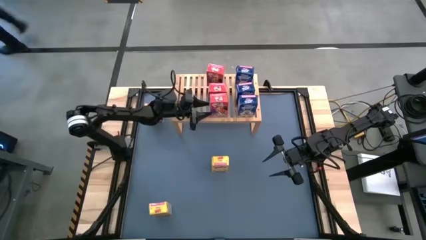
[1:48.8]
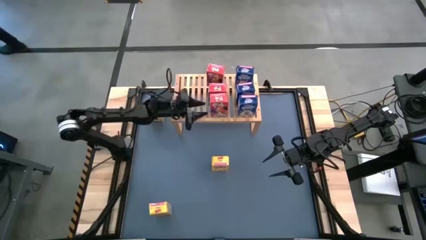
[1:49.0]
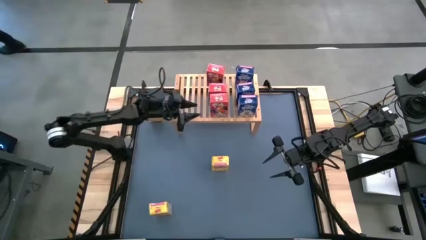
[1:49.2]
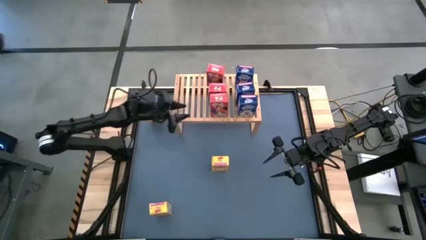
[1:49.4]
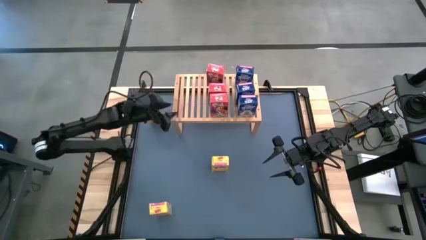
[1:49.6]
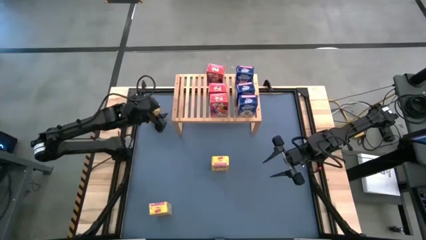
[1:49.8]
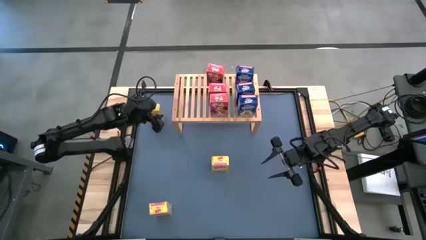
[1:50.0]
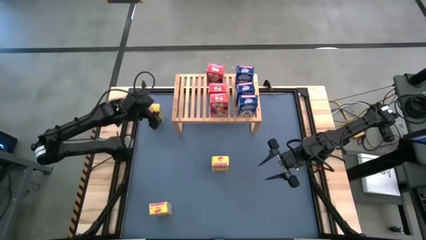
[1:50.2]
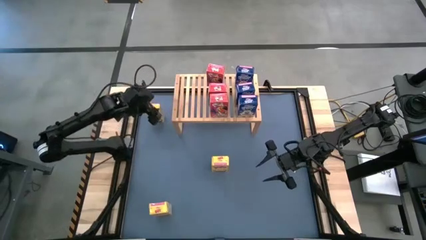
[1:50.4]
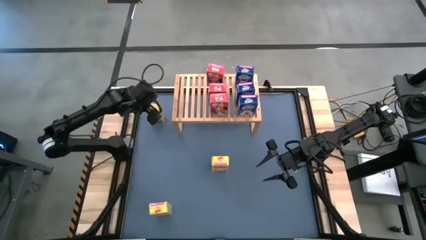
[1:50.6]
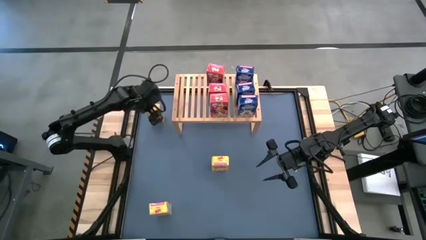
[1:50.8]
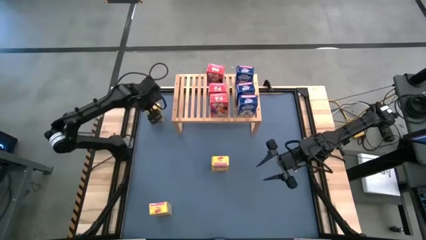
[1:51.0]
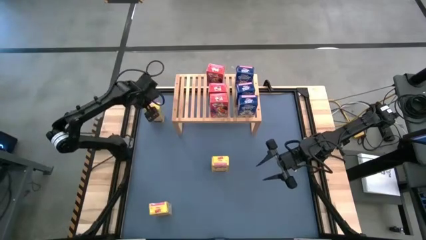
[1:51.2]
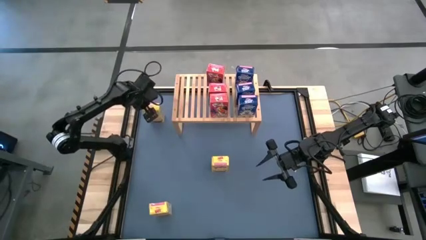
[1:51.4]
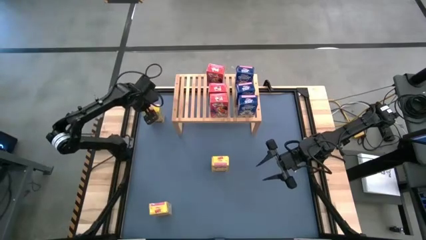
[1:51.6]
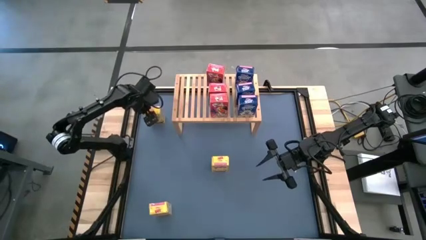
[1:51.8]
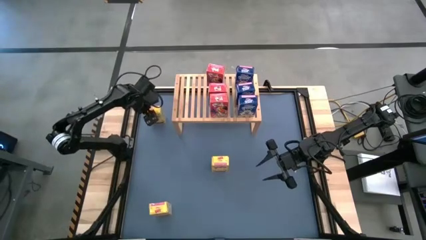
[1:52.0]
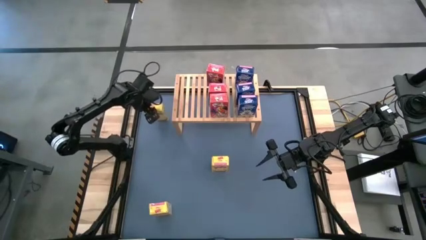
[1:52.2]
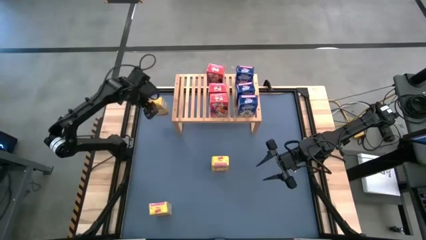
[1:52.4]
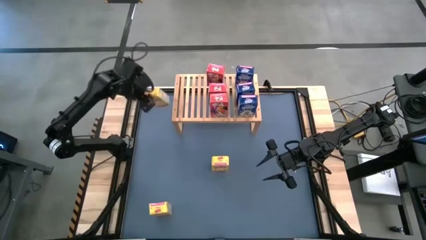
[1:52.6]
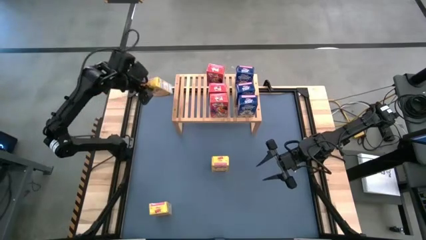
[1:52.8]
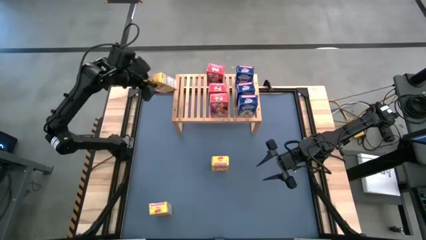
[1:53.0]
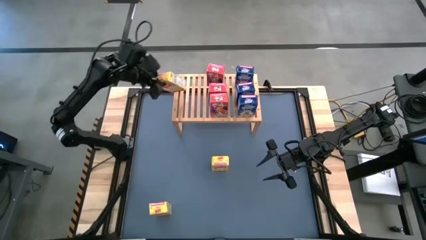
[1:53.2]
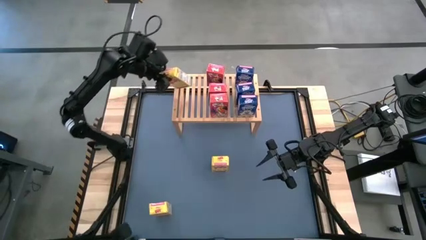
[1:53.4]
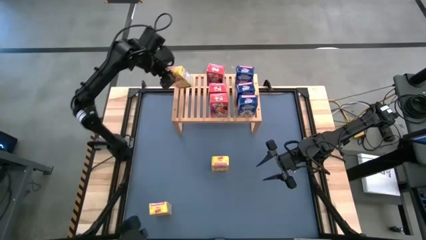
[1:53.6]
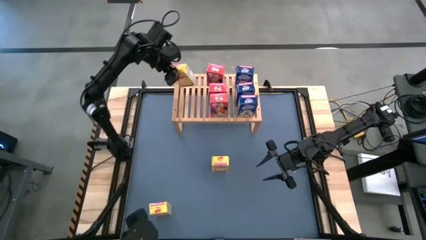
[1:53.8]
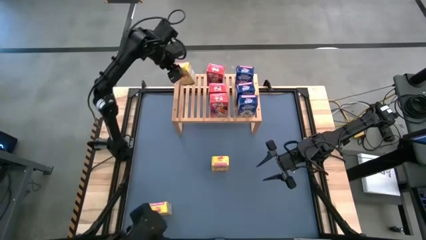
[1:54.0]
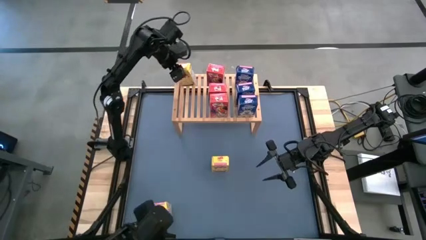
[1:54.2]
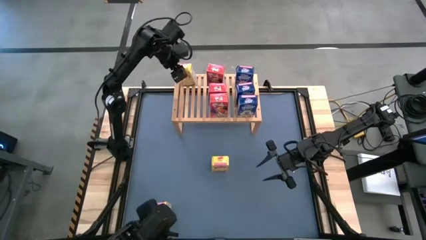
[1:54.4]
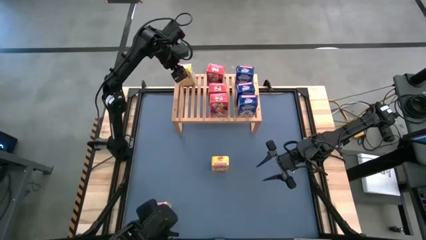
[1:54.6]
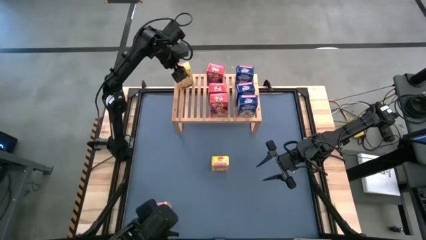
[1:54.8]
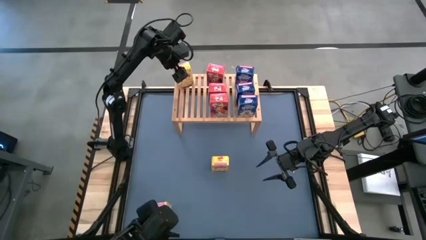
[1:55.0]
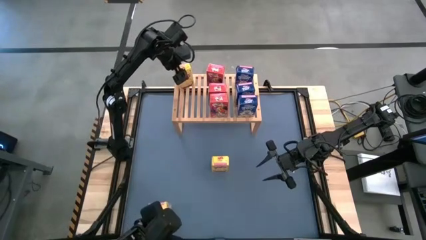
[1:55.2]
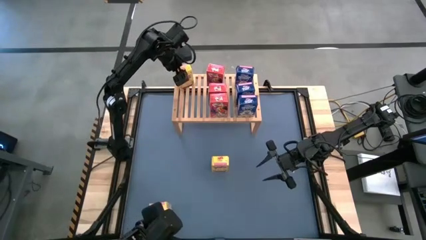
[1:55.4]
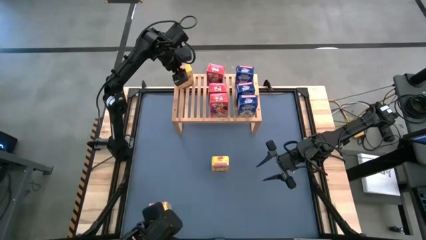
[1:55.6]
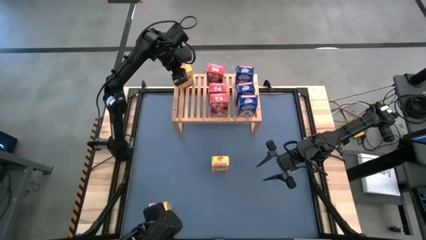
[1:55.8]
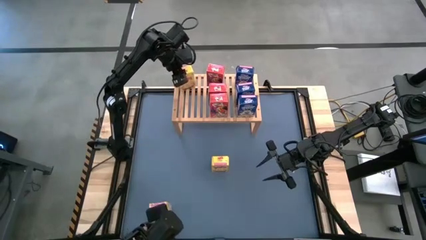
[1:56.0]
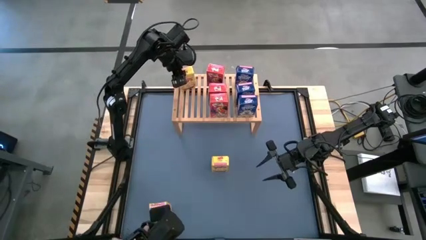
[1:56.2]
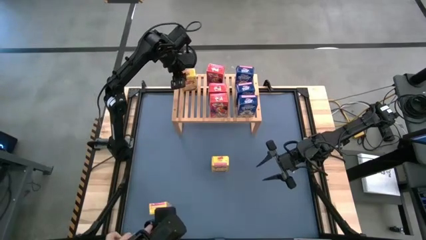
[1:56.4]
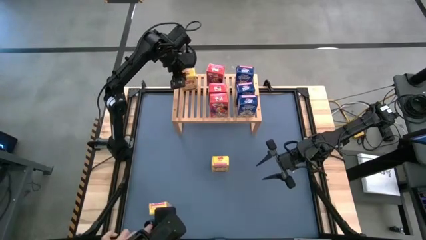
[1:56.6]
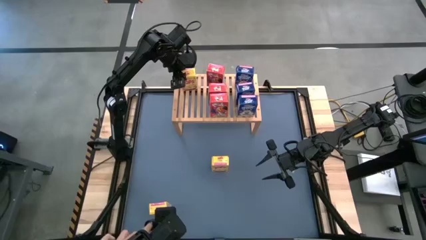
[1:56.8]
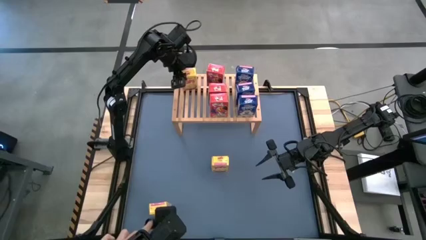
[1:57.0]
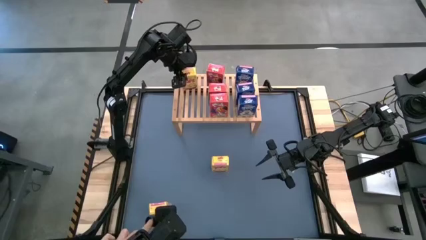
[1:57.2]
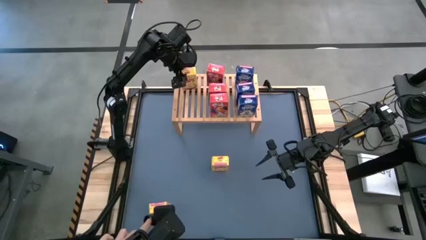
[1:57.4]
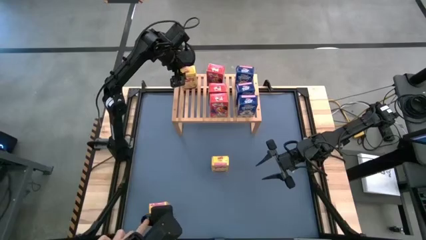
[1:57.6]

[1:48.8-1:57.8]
Task: Stack cereal on shelf
Put the top left yellow cereal box on the shelf
